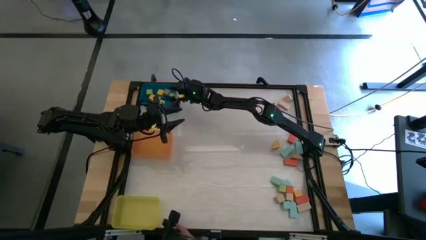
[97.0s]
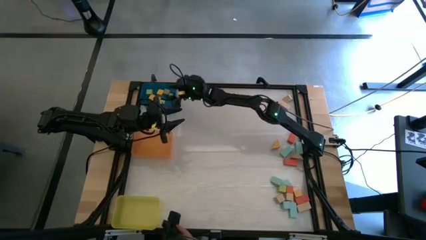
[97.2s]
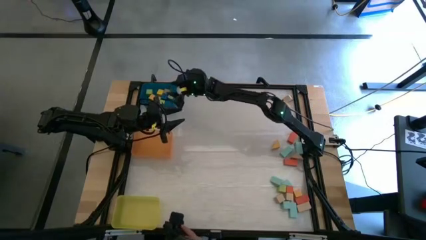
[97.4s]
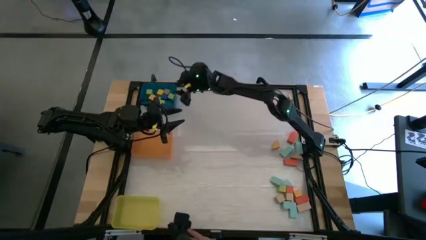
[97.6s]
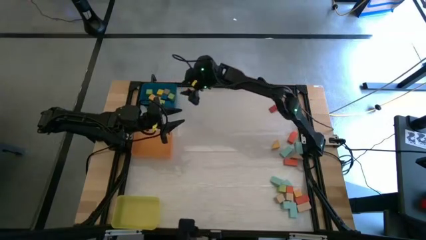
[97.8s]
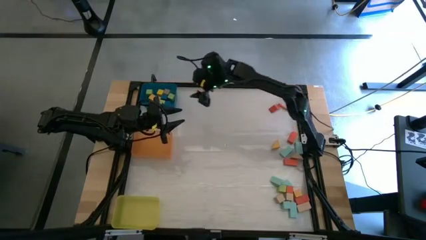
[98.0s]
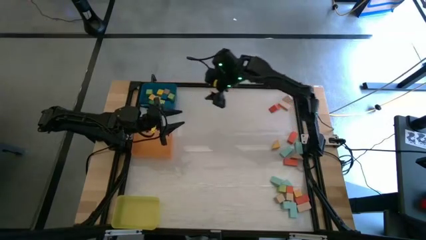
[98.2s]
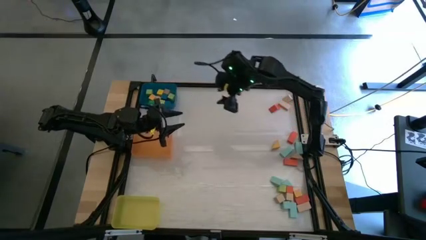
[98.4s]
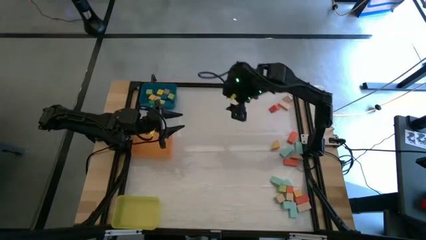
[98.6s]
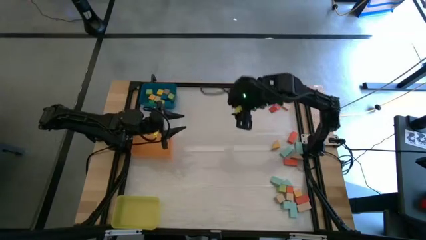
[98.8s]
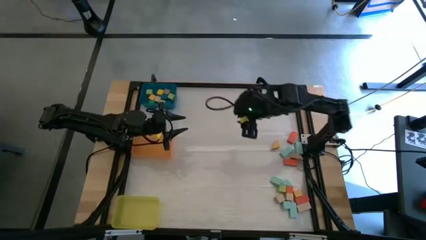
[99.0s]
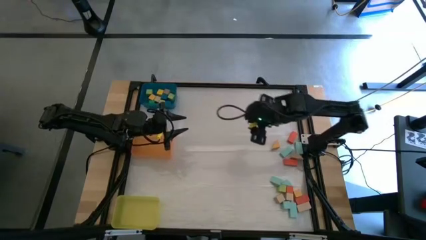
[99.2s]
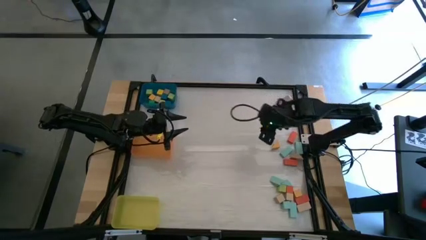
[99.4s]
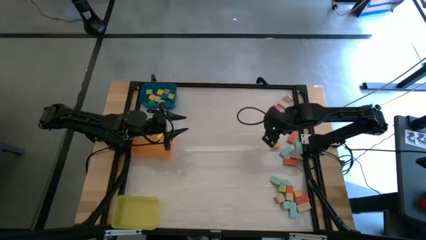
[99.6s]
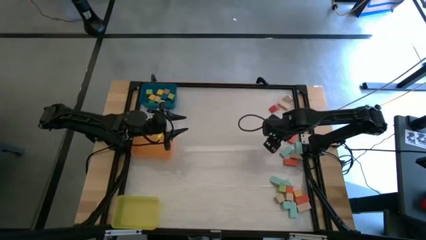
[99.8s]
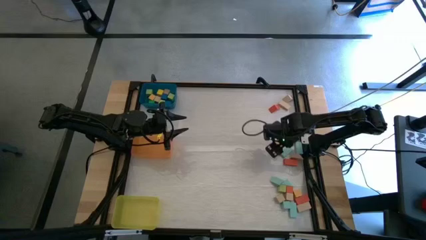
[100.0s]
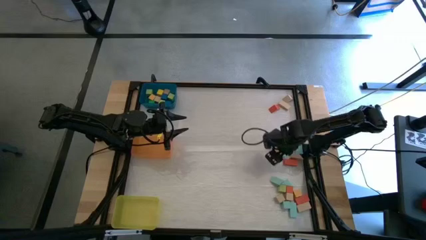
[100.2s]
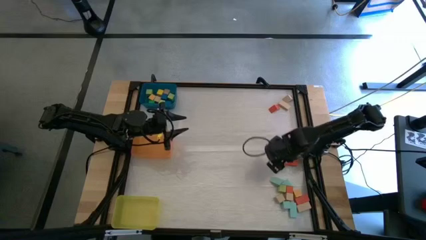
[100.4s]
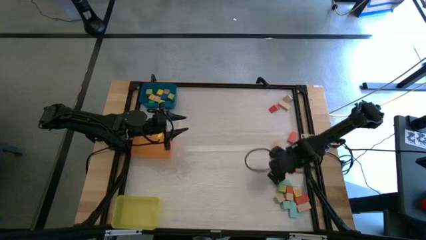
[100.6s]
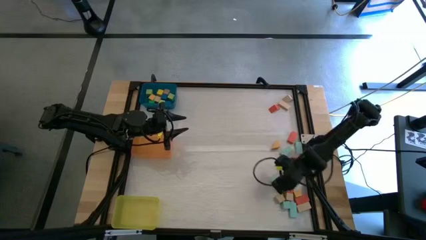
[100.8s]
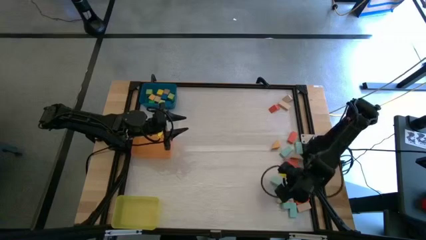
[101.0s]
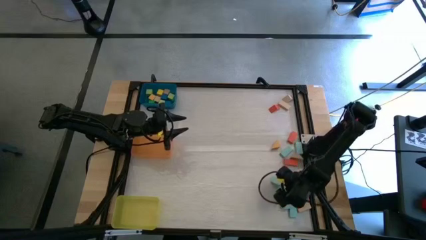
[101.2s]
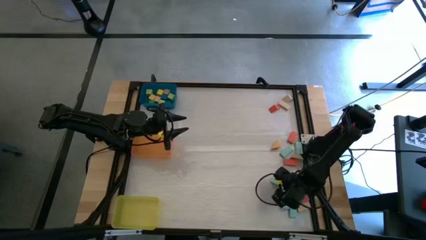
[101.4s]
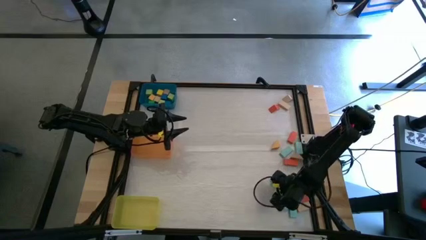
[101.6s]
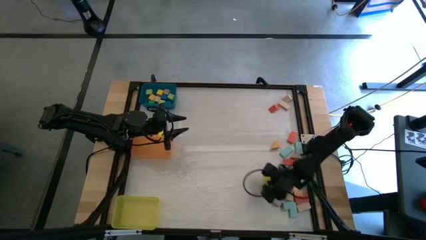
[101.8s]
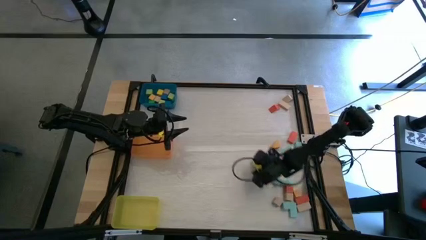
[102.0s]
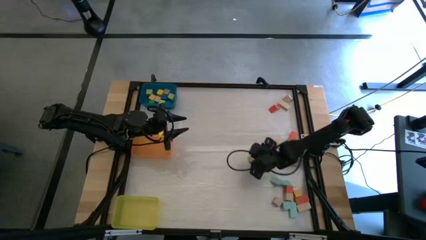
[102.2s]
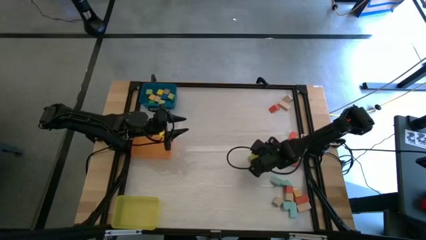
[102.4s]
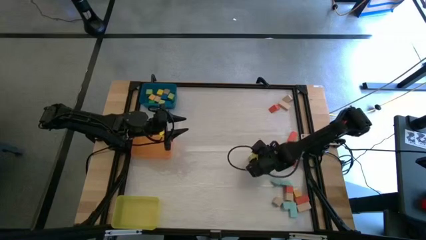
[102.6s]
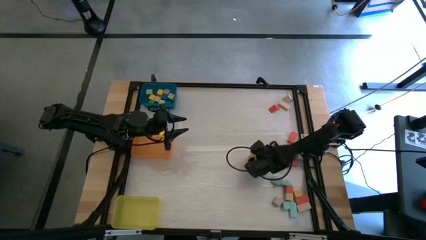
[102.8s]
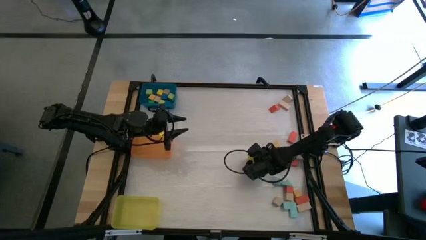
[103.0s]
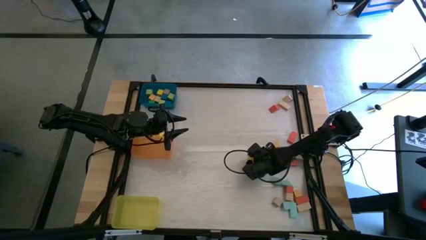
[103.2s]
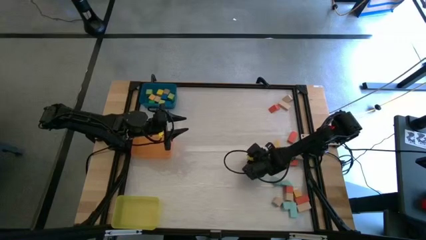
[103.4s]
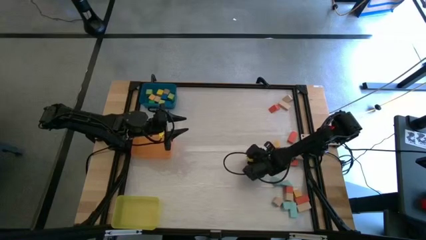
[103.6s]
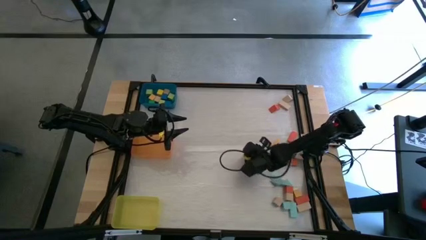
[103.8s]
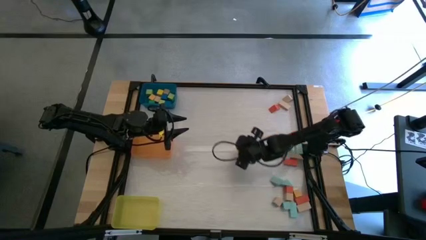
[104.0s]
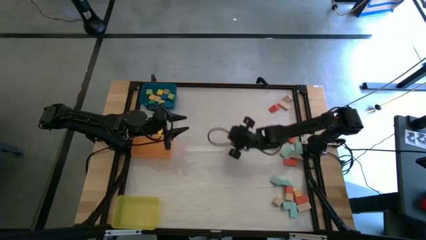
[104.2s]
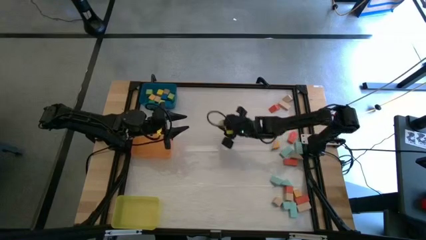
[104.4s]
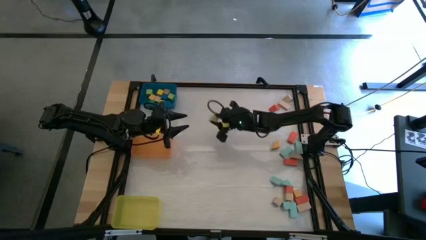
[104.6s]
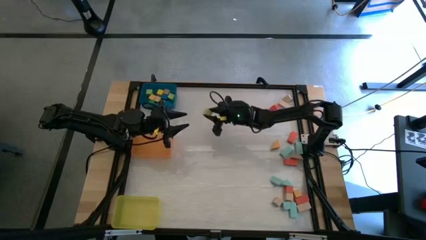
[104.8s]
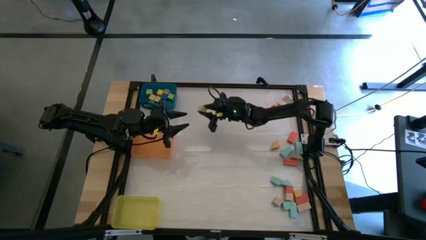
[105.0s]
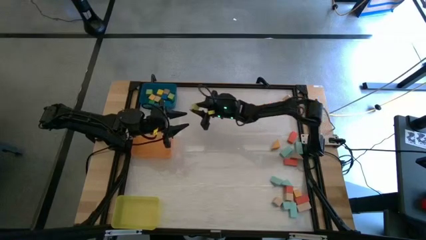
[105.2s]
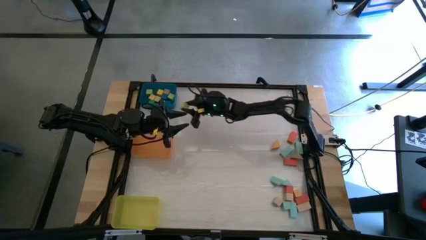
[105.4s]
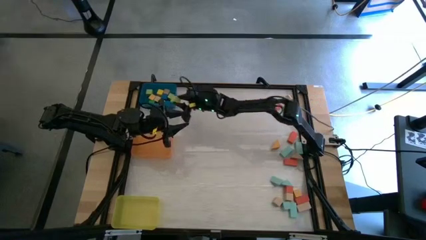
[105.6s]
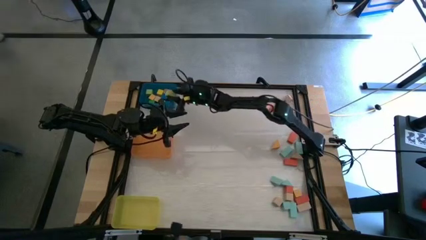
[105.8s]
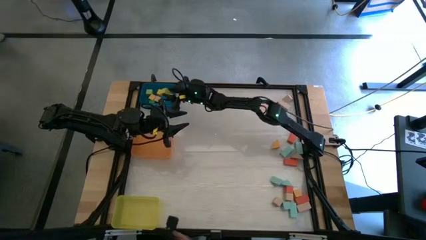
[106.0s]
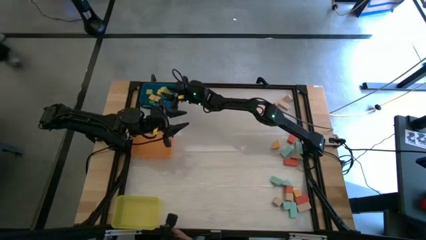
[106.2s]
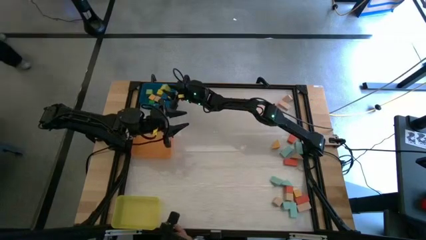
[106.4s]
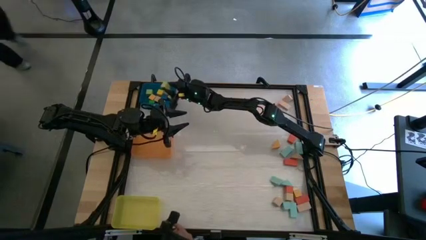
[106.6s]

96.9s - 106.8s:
Task: Sort blocks by size
Put the light green cube block into the blue bin

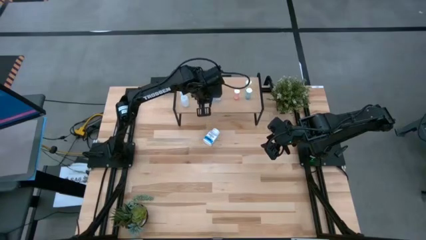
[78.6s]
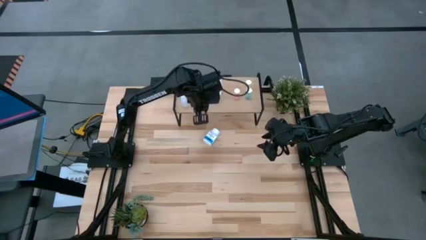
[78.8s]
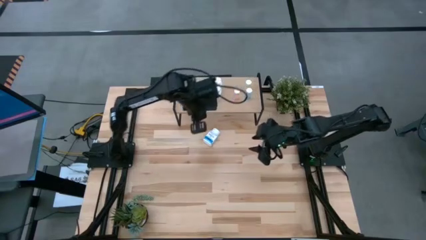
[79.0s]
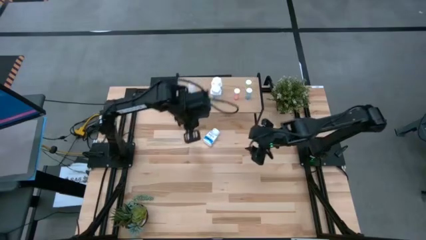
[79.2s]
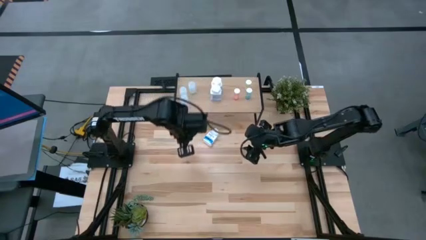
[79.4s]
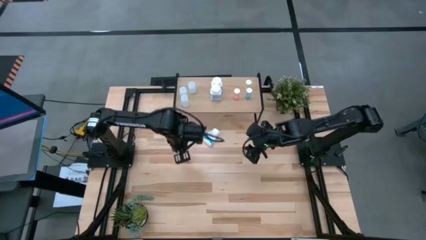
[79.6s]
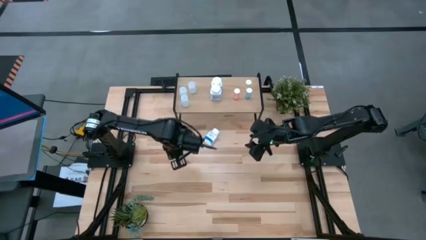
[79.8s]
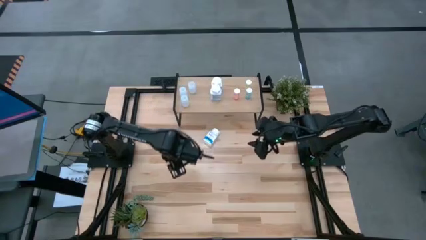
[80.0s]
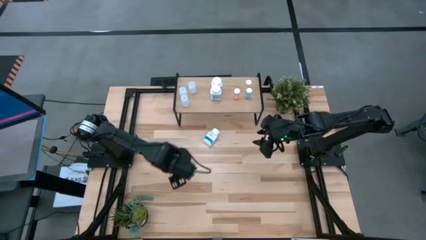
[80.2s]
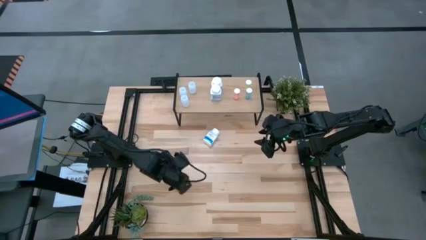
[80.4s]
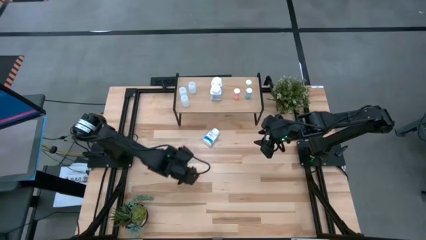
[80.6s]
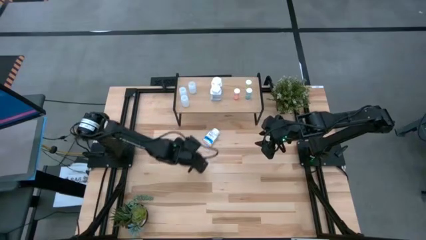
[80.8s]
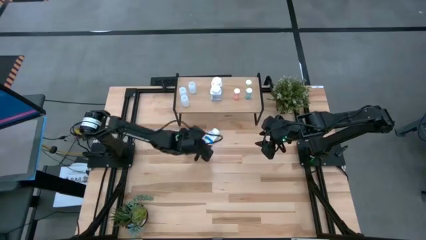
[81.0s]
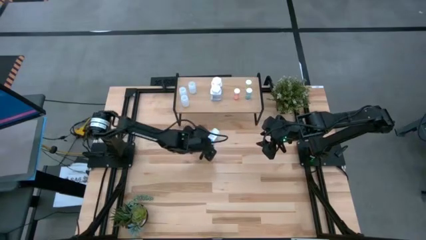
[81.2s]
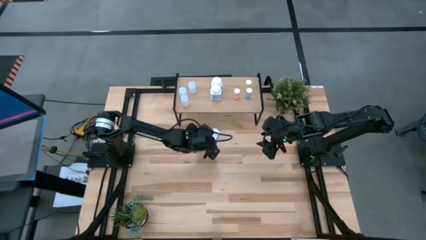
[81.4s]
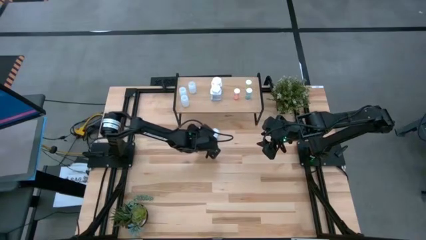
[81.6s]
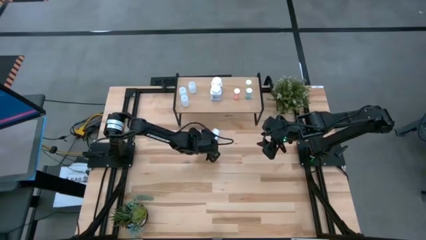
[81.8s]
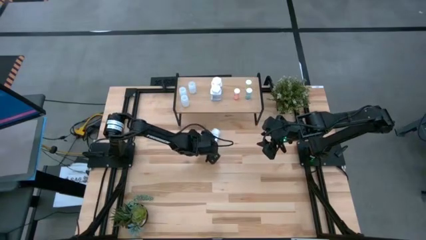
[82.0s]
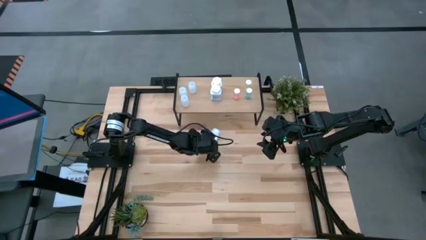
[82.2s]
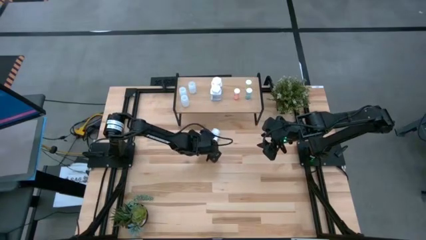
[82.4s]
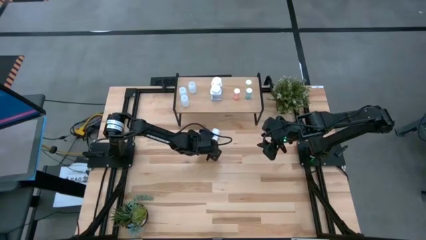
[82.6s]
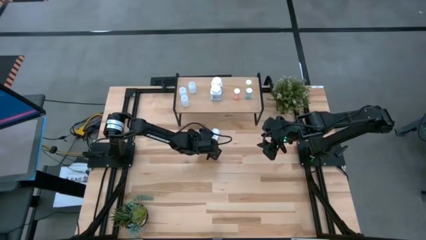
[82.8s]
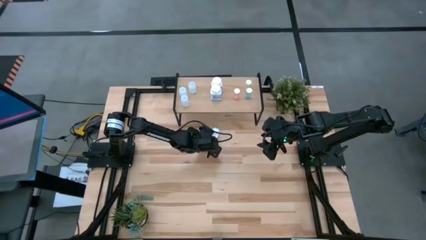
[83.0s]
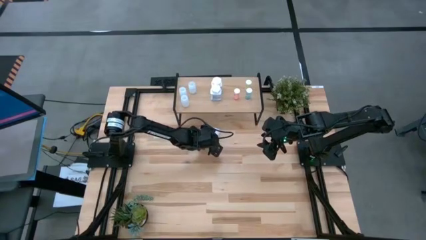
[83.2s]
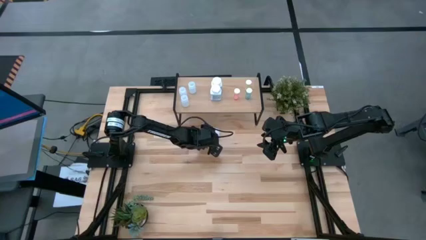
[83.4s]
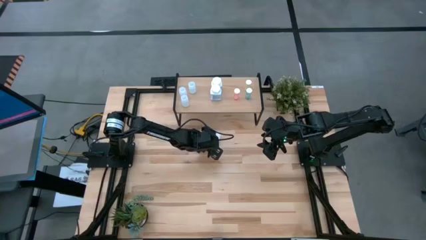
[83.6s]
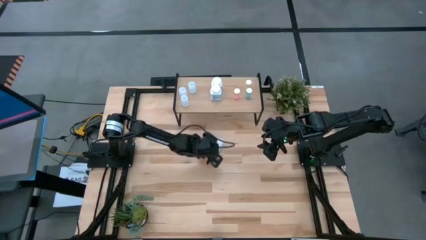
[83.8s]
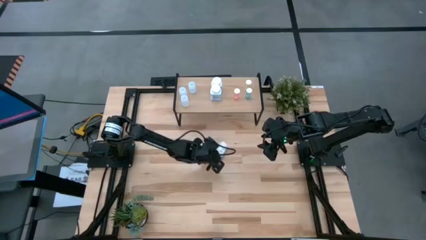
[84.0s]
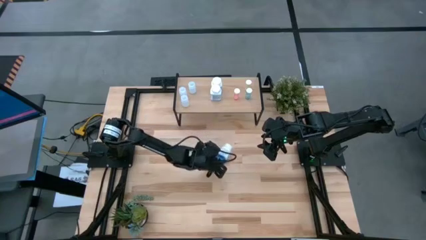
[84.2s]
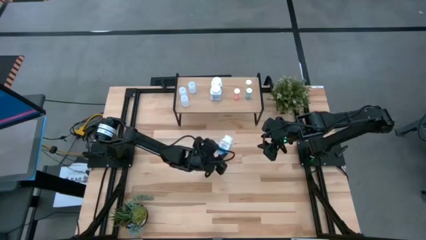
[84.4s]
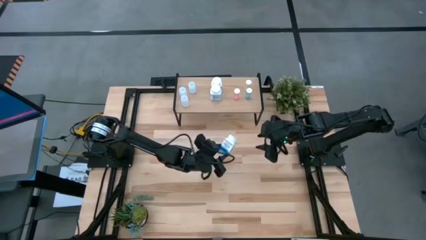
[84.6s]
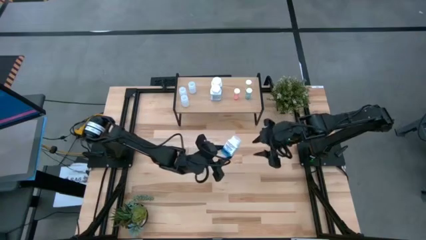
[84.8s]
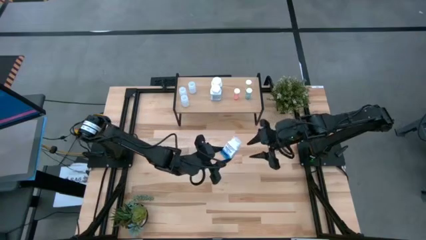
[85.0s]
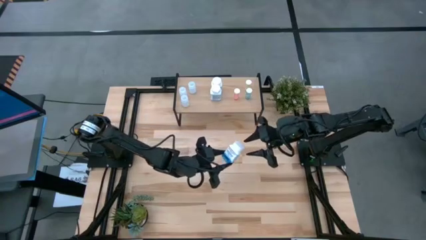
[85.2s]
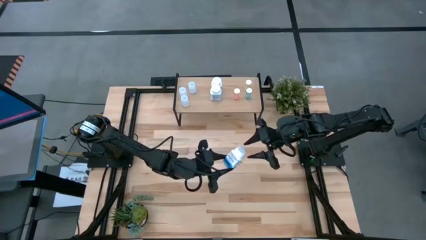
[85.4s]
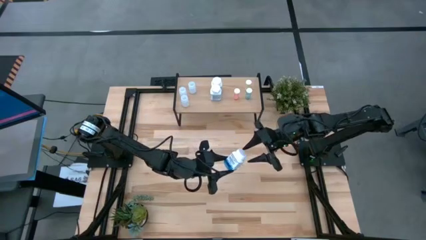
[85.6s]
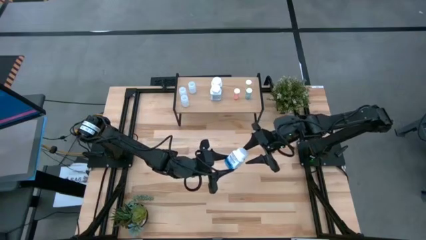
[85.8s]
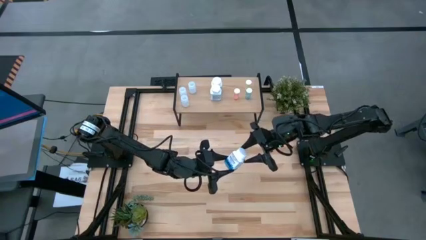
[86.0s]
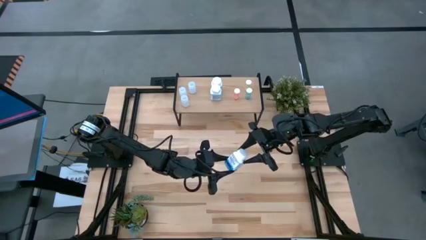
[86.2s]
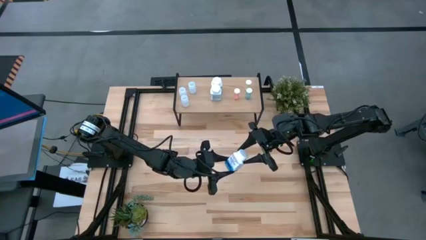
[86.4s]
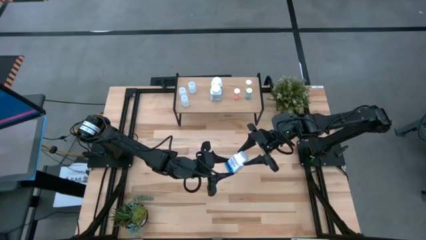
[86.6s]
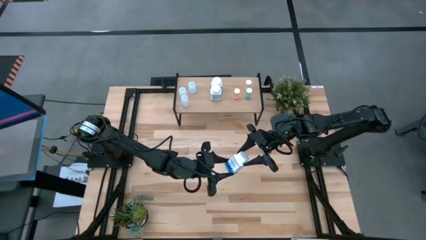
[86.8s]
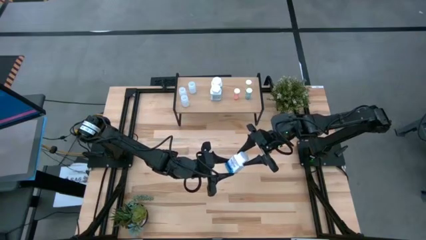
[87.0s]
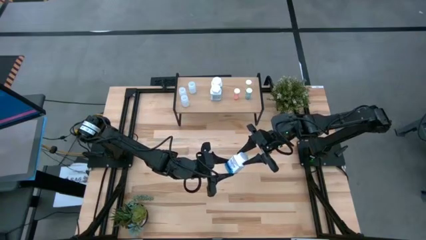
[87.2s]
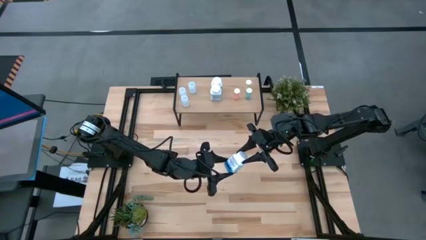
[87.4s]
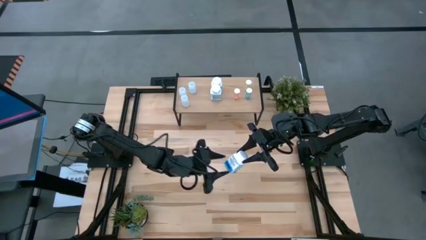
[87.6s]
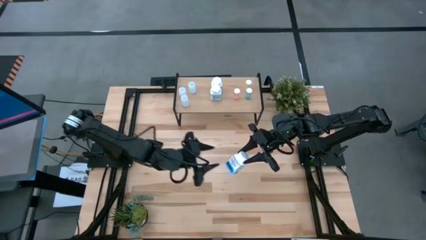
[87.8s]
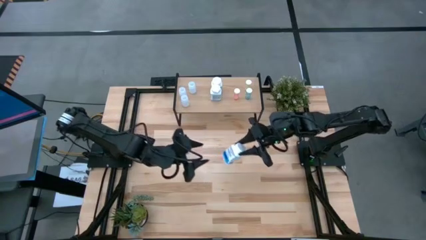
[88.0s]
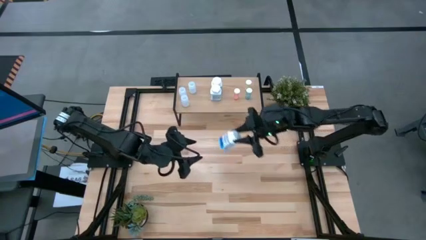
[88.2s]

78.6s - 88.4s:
Task: Pick and place medicine bottles onto shelf by color
Put the white medicine bottle on the shelf aligned with the other white medicine bottles
